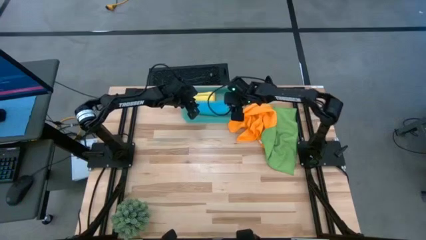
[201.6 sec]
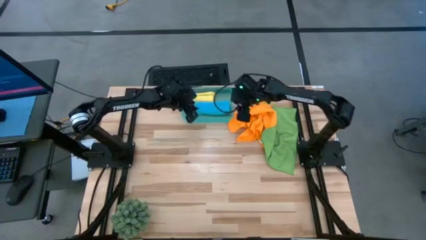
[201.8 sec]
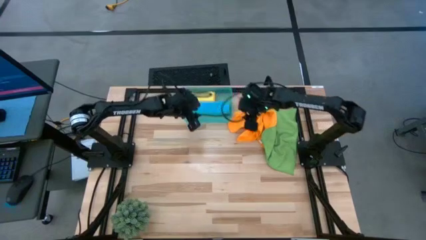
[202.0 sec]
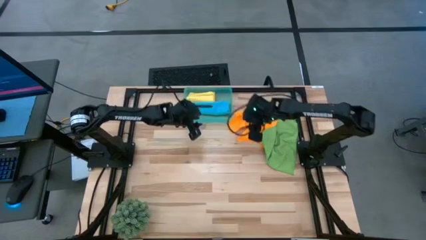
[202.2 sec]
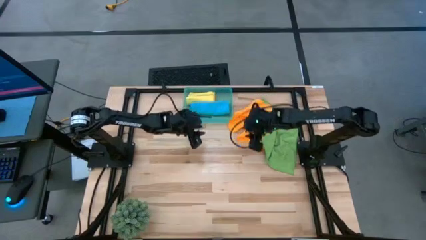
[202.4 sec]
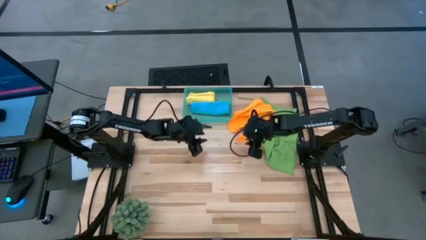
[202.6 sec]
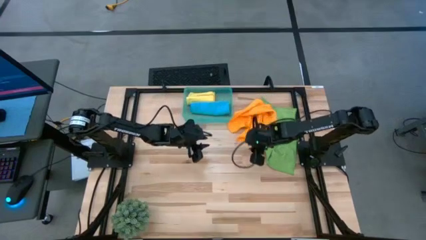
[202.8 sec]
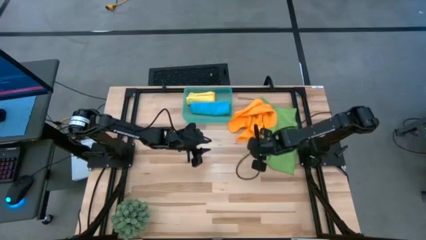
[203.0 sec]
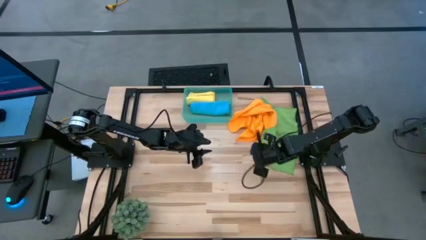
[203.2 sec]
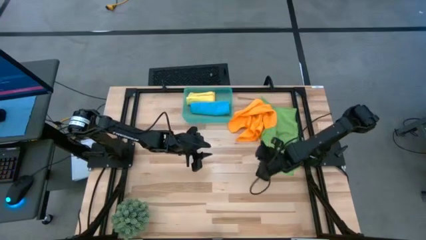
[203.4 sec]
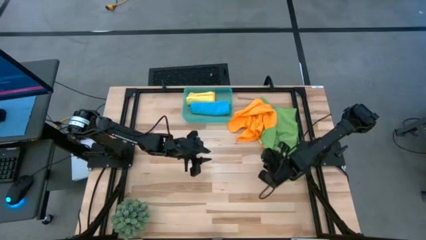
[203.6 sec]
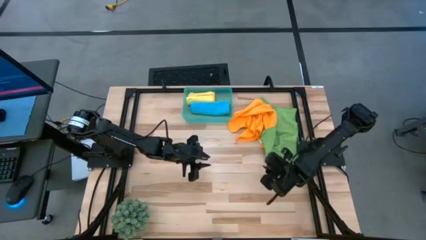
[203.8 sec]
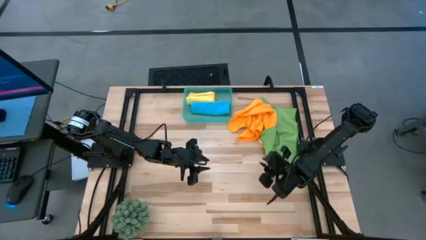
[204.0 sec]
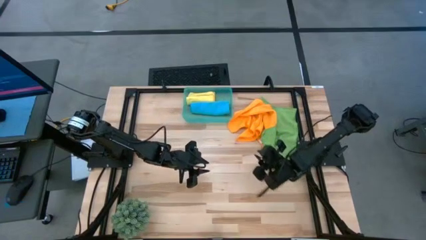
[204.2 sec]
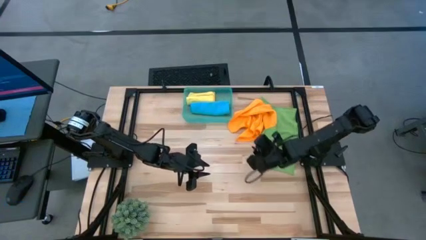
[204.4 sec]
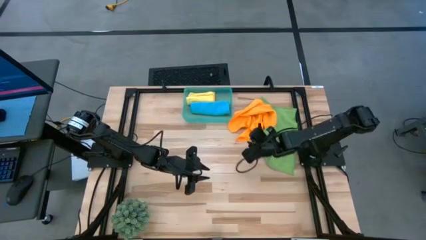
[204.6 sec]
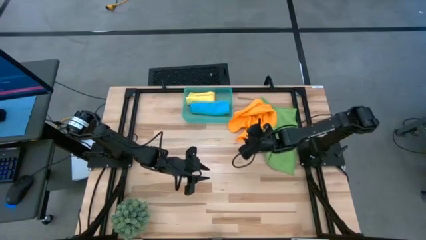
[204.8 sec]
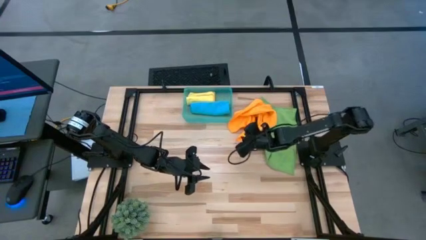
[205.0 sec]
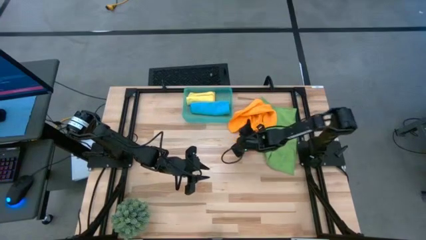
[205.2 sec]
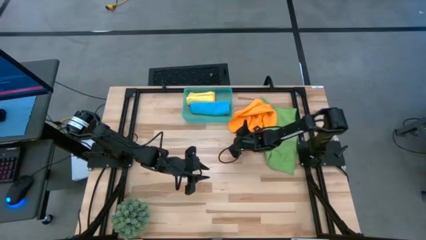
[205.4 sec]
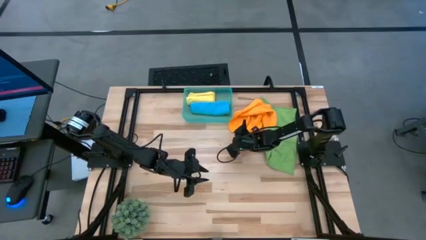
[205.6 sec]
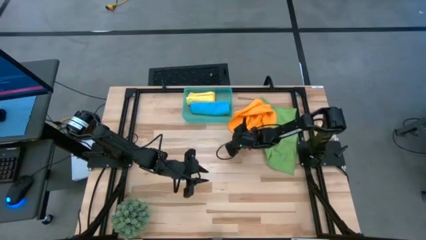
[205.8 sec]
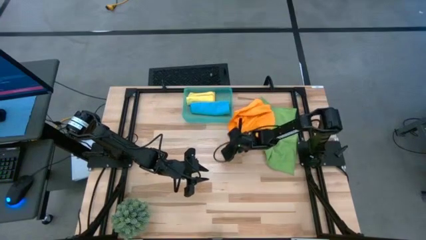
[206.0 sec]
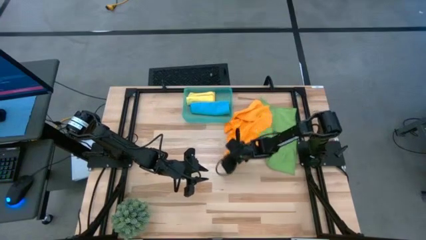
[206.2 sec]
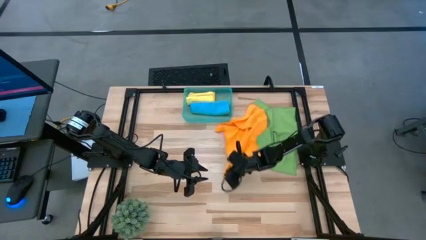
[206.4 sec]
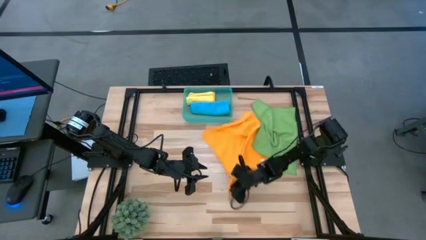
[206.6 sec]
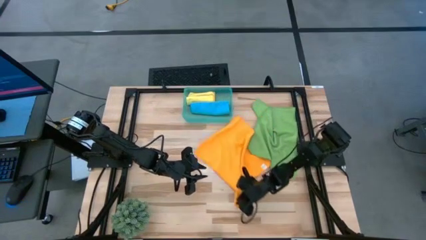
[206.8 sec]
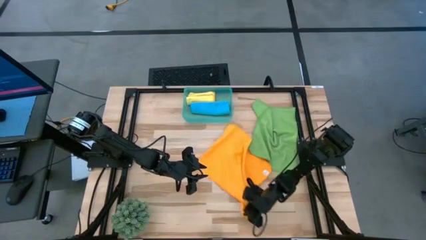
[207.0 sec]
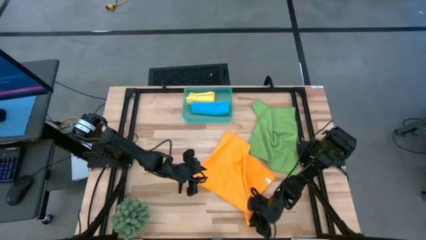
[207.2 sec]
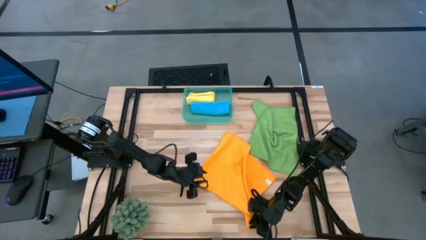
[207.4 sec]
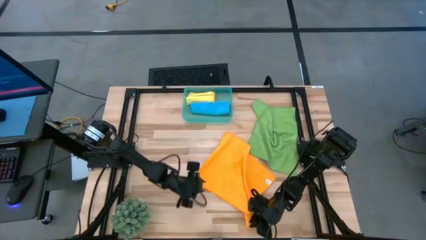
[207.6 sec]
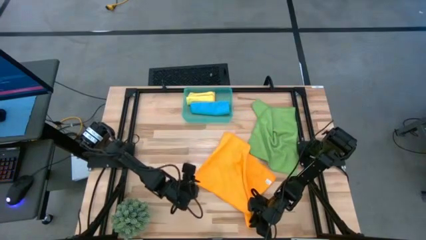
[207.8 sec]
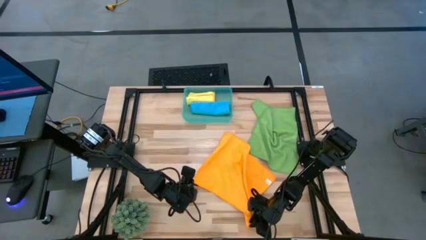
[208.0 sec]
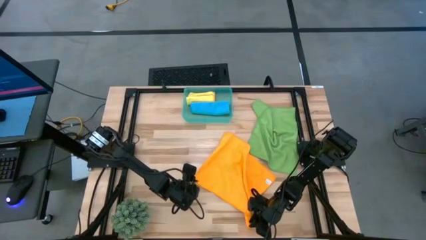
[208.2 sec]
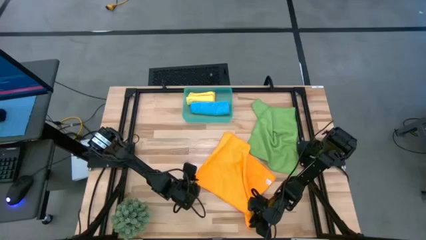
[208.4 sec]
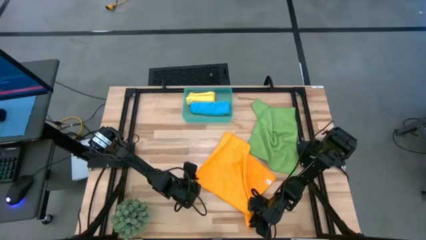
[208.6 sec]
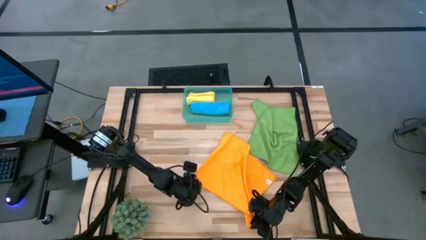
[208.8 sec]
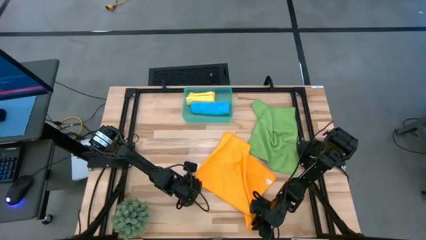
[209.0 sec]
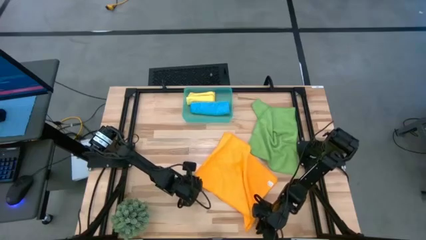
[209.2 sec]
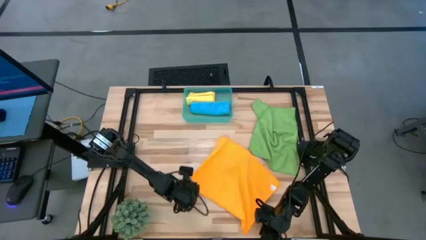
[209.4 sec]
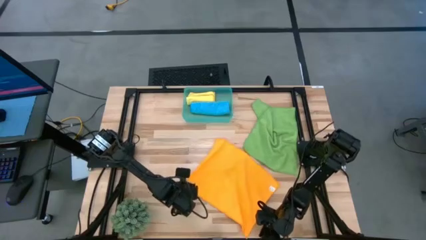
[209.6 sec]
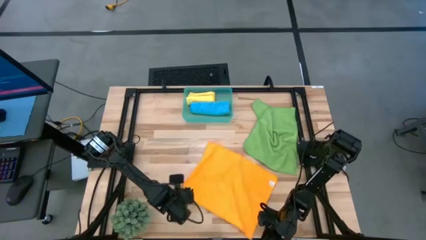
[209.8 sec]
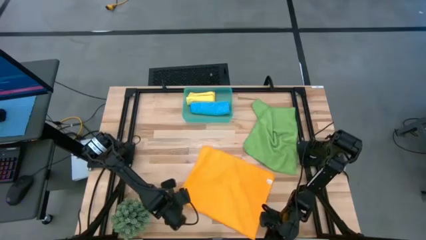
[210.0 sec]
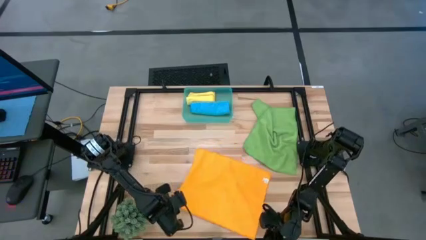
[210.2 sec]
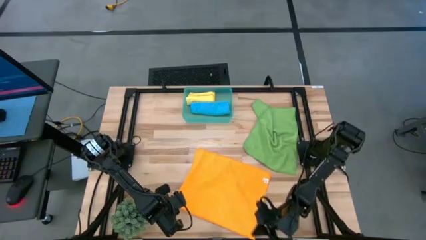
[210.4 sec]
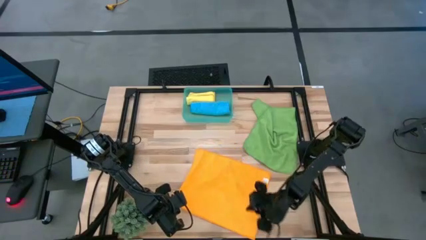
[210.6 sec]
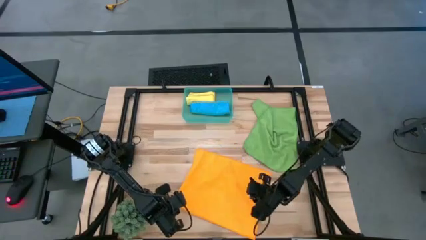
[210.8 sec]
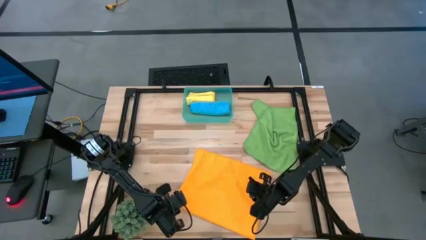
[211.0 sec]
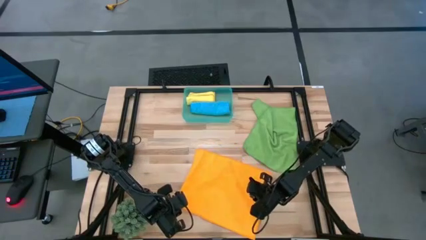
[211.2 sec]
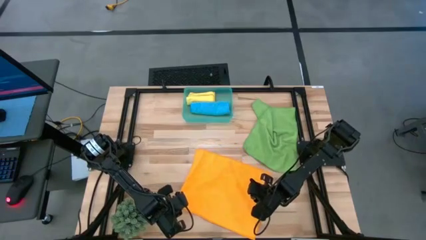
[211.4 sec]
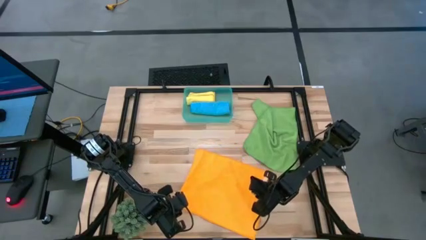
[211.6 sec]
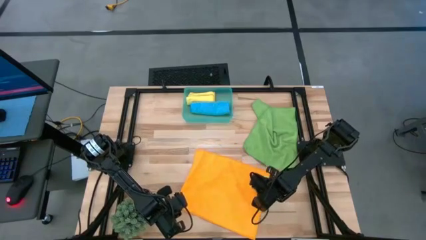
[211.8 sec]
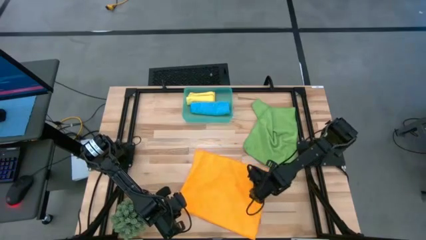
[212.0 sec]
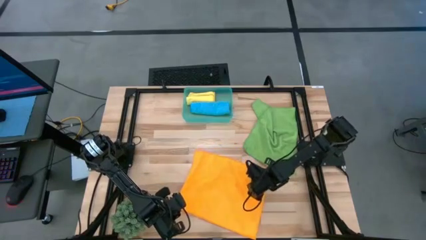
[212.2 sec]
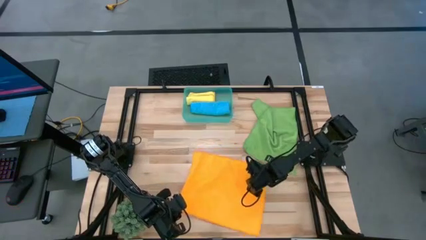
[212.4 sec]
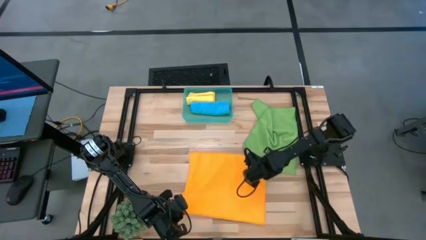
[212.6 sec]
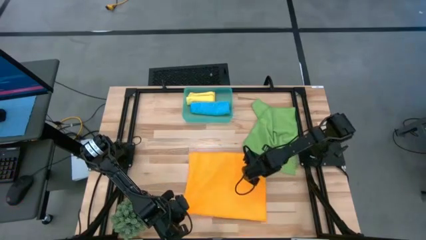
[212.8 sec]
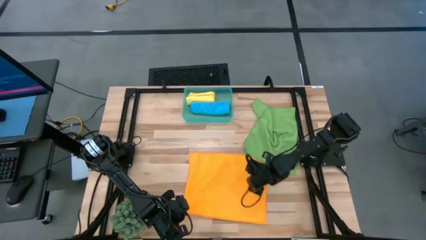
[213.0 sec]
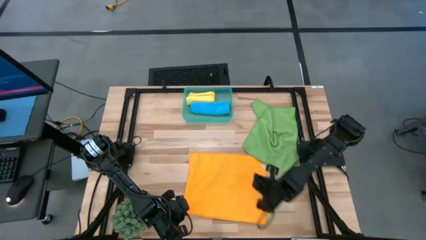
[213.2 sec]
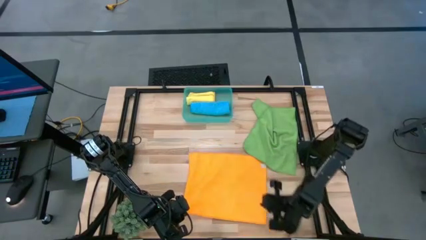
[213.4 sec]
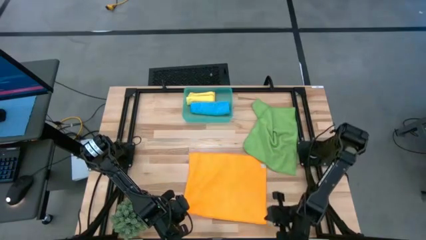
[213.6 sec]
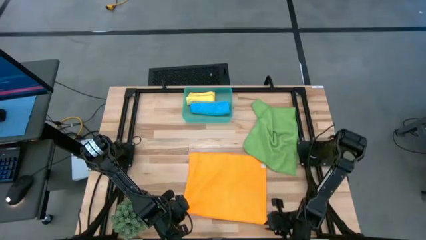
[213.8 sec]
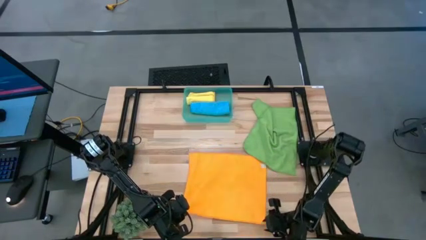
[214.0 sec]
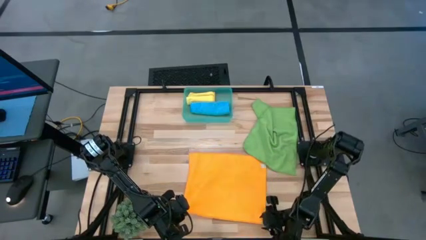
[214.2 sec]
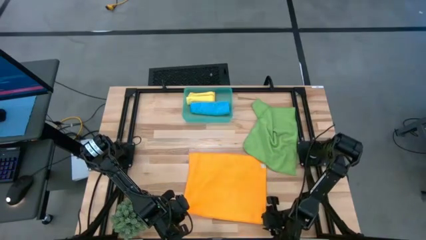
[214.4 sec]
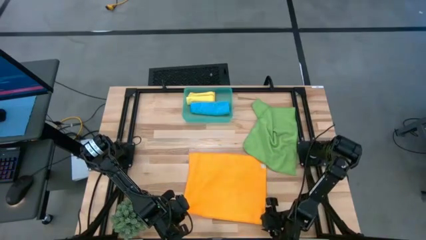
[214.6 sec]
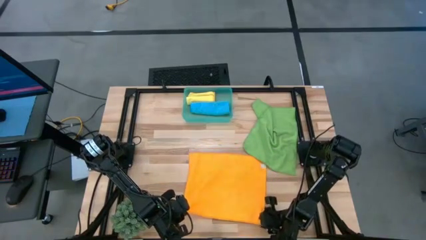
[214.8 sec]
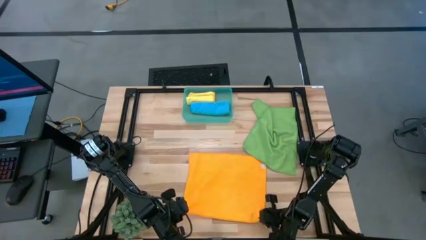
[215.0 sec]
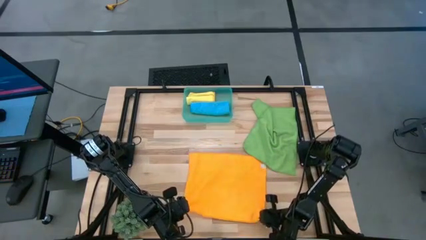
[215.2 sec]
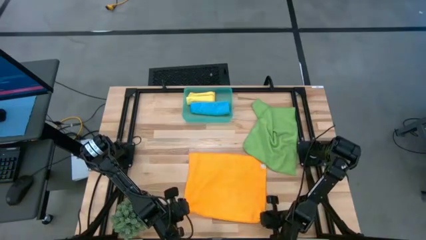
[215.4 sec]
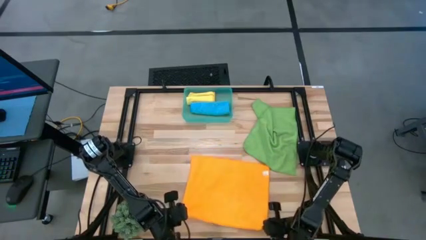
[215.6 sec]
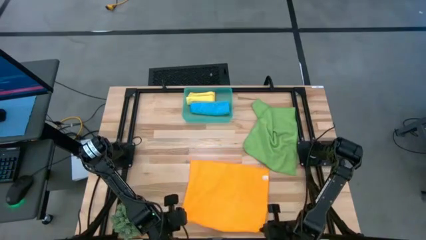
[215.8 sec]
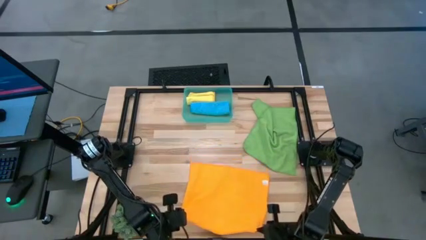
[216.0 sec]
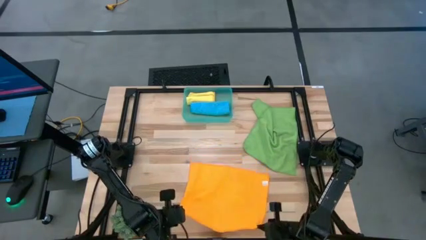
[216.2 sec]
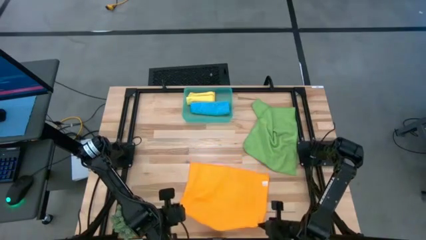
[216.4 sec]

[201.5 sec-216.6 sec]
Task: Roll microfiber towels into tight, uniform cylinder then place into a basket
Fold the orange microfiber towel
